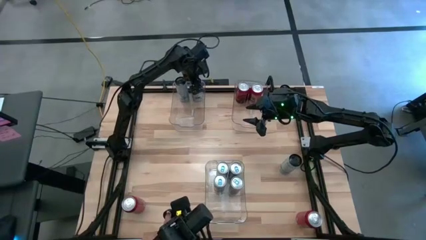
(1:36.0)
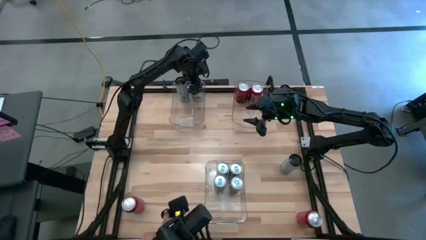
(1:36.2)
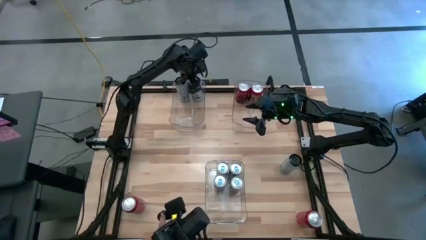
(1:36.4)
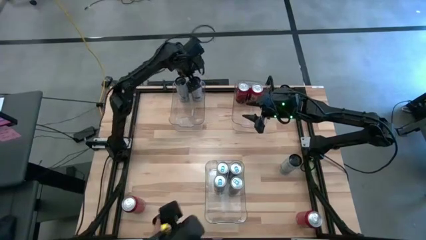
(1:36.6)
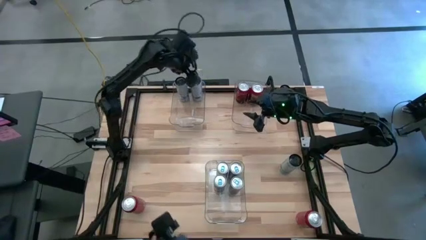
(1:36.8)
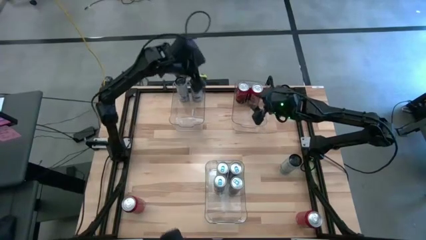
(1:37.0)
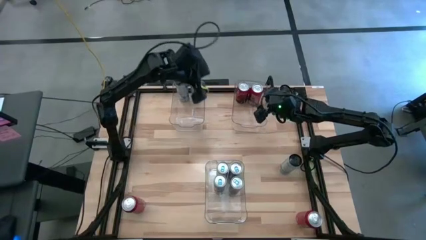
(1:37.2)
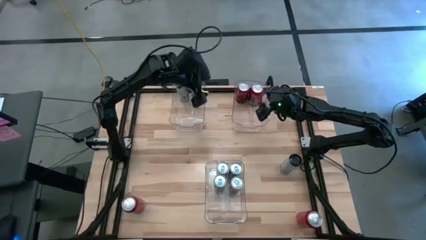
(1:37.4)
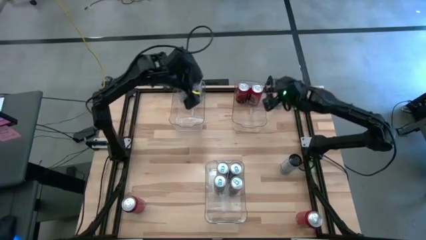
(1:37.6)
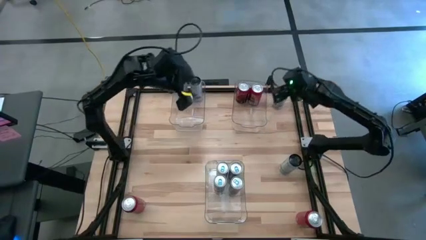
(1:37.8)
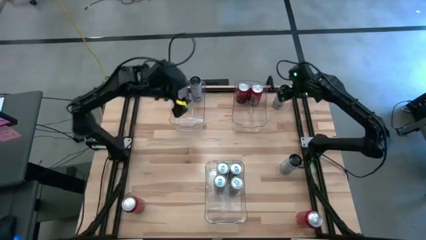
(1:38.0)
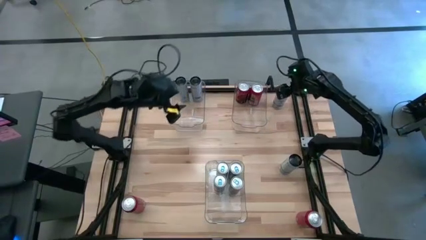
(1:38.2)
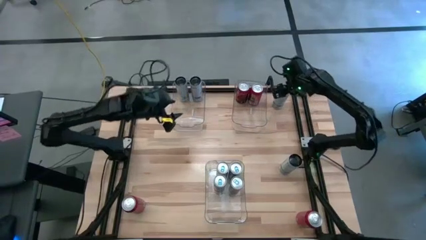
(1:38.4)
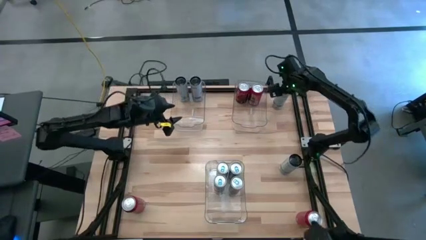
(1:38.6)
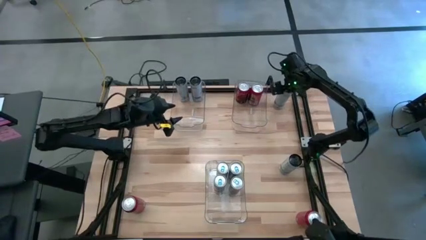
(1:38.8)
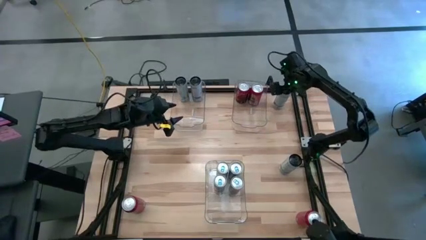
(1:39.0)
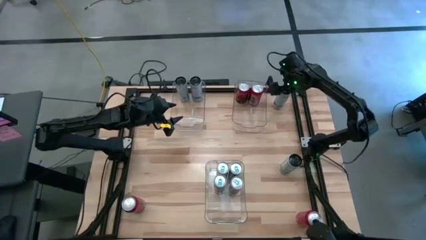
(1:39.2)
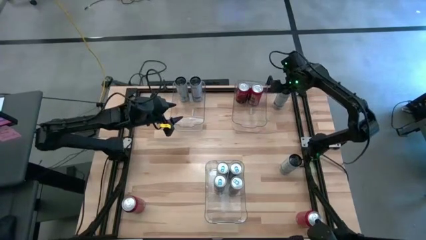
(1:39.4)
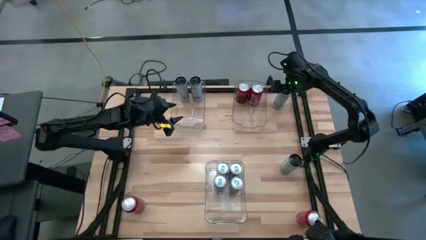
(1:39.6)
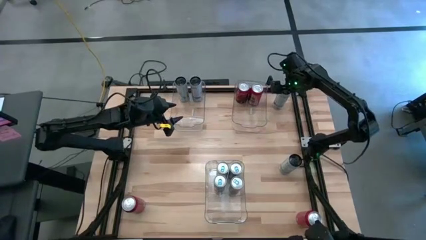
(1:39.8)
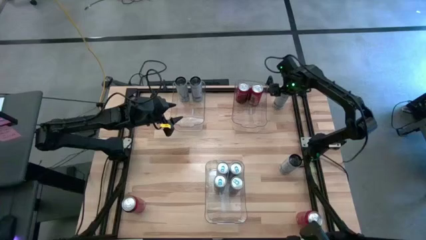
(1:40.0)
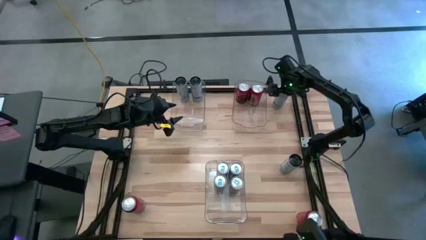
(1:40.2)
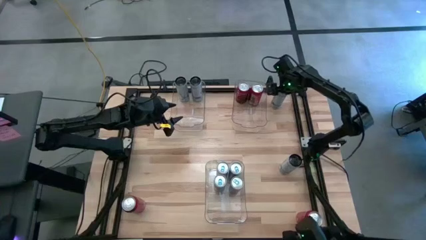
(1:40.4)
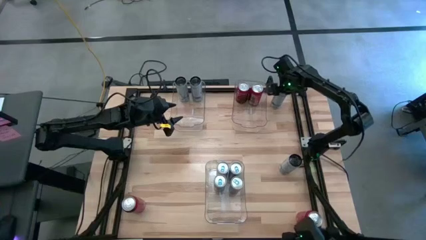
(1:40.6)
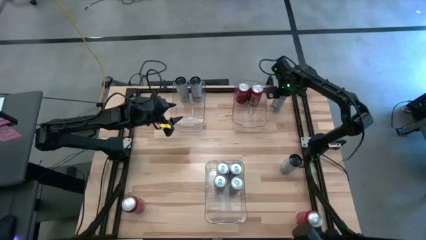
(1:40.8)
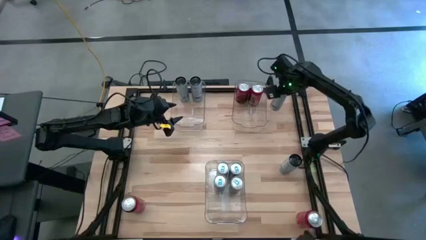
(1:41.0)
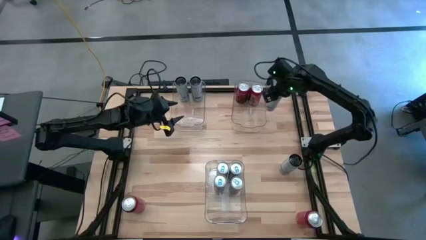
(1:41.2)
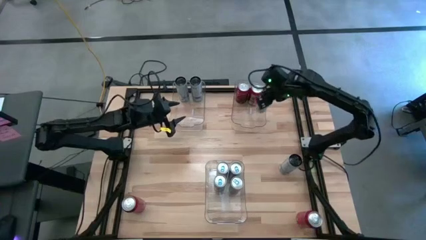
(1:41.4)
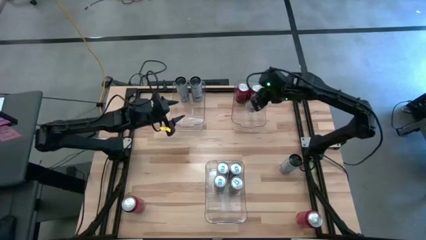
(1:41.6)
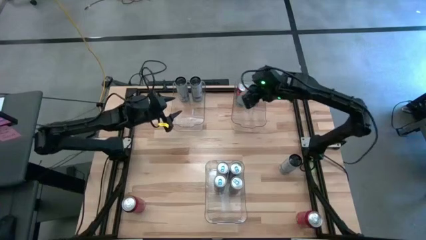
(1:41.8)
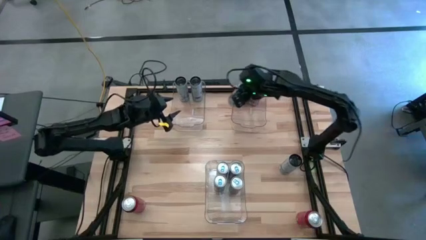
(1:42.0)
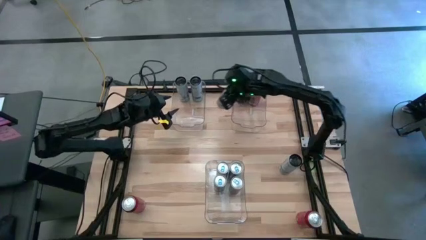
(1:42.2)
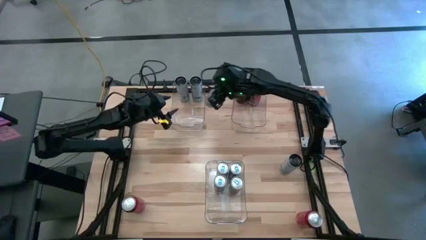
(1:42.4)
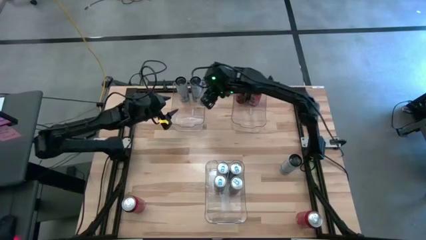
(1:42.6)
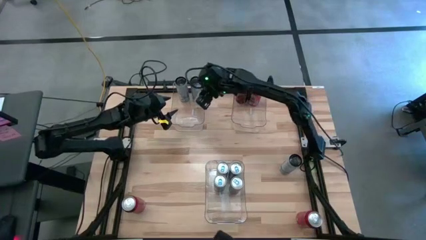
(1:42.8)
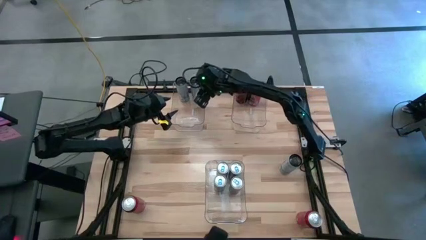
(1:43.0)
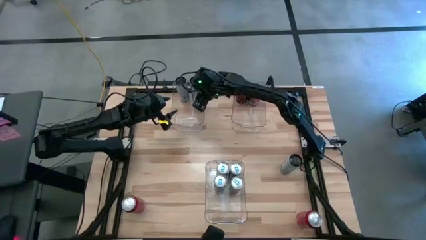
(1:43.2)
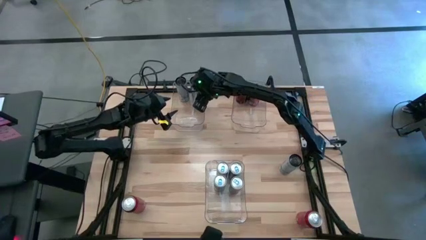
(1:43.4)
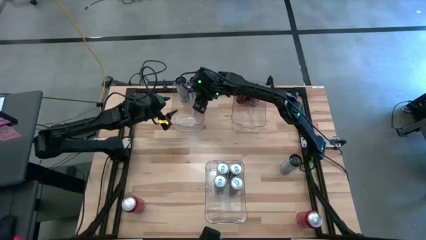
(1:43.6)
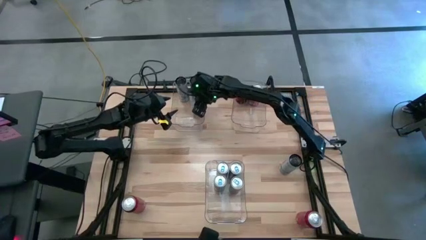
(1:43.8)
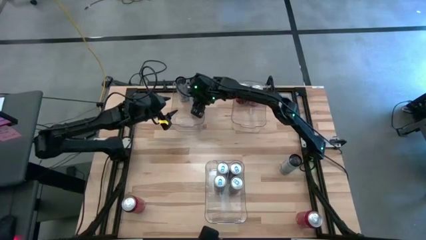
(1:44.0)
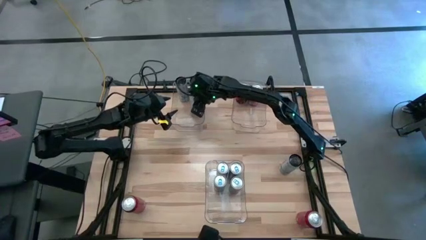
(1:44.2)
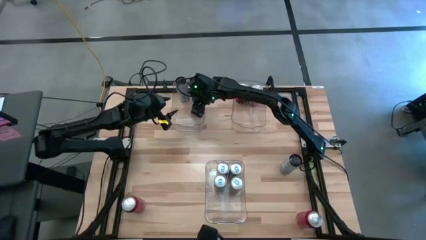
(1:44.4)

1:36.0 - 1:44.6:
Task: Sort soda cans
Put the top white soda can into the top left transparent bin

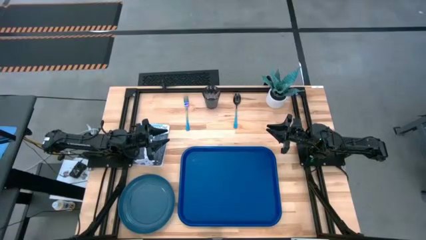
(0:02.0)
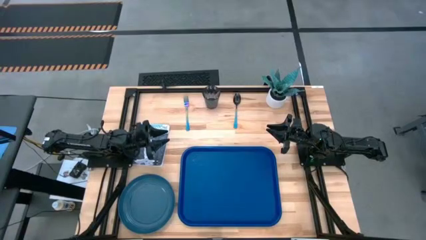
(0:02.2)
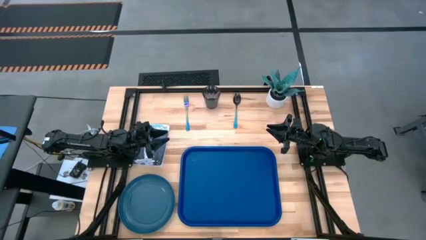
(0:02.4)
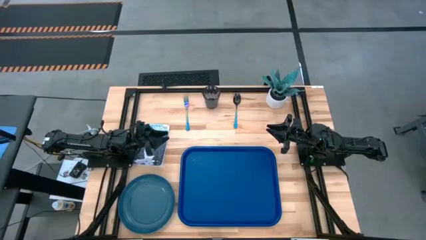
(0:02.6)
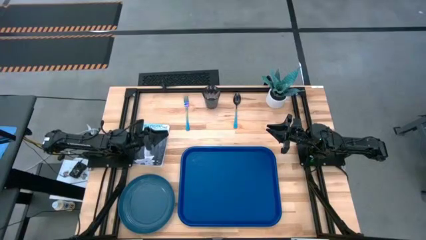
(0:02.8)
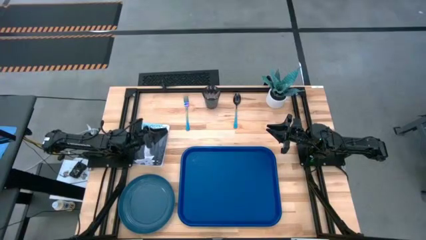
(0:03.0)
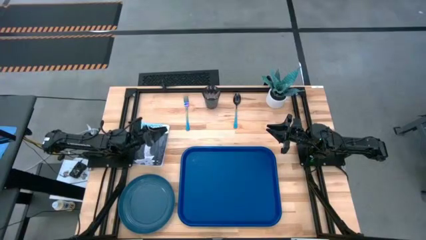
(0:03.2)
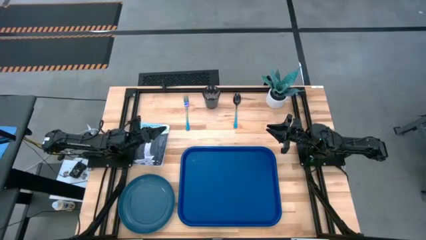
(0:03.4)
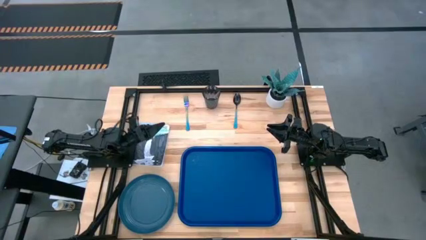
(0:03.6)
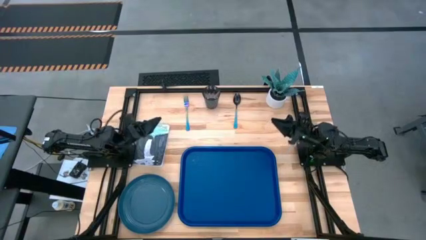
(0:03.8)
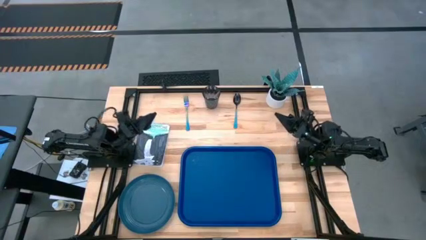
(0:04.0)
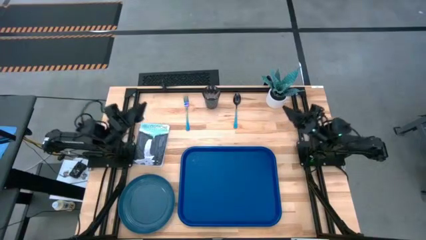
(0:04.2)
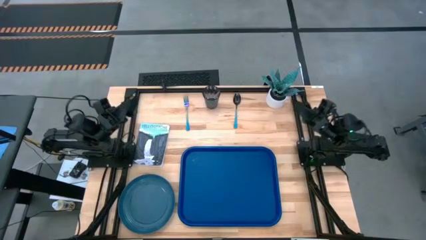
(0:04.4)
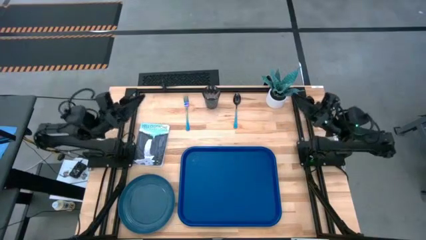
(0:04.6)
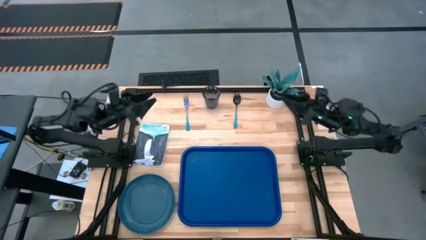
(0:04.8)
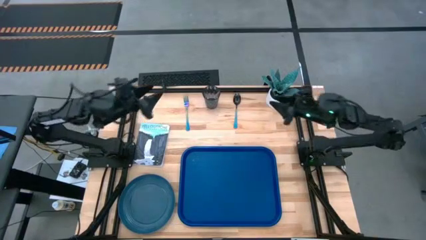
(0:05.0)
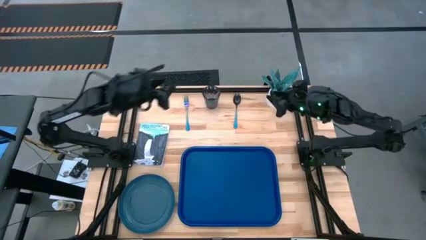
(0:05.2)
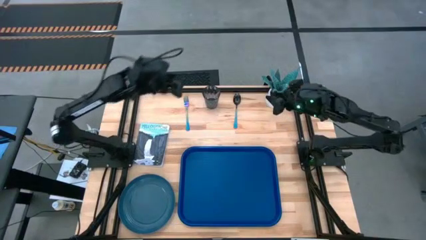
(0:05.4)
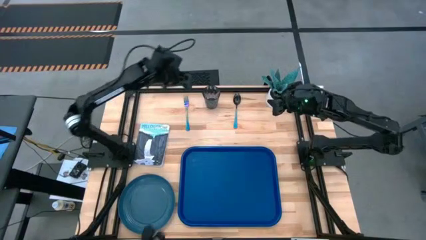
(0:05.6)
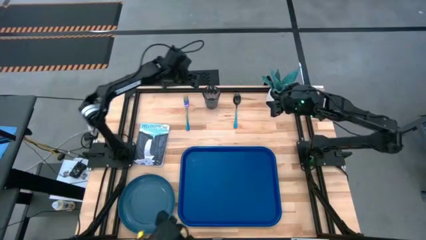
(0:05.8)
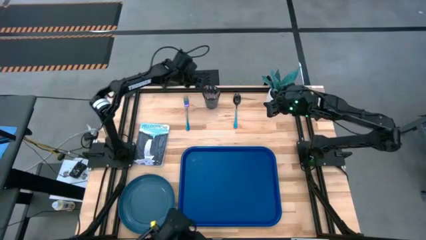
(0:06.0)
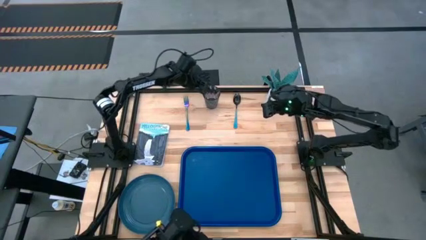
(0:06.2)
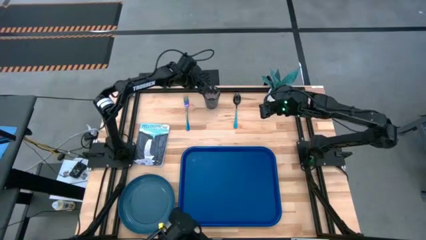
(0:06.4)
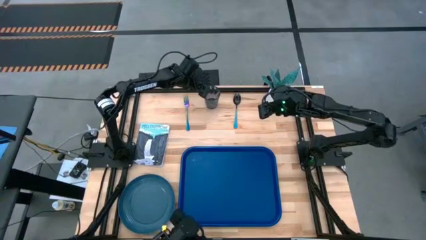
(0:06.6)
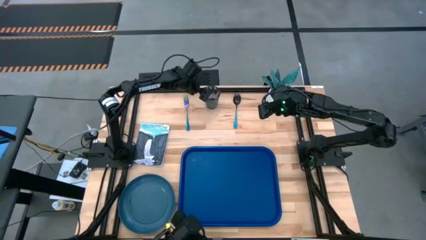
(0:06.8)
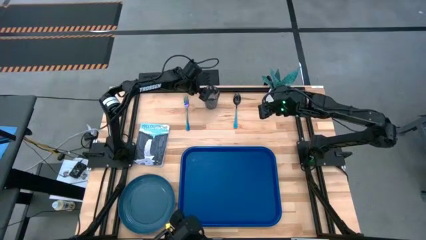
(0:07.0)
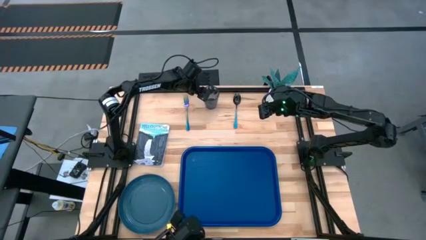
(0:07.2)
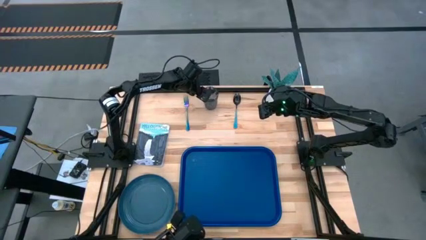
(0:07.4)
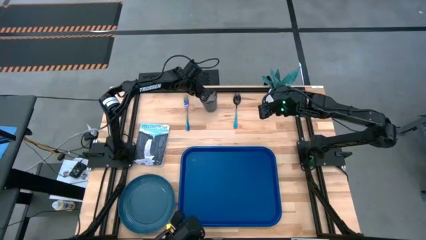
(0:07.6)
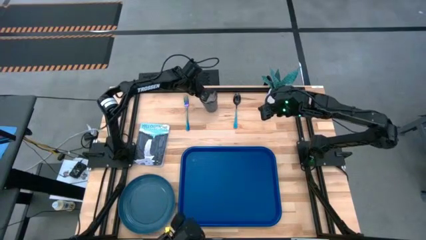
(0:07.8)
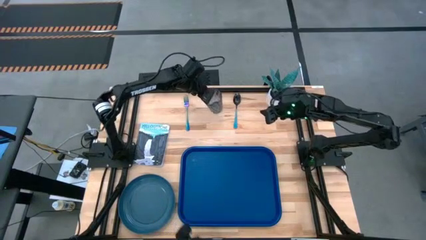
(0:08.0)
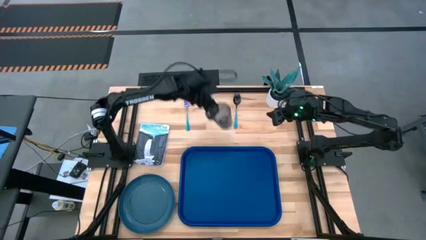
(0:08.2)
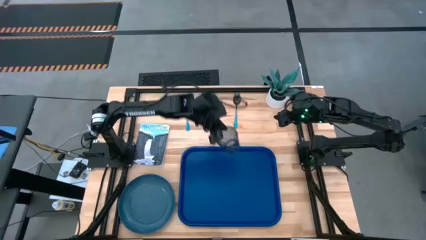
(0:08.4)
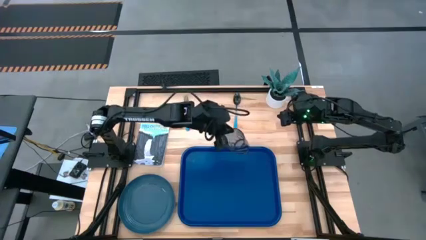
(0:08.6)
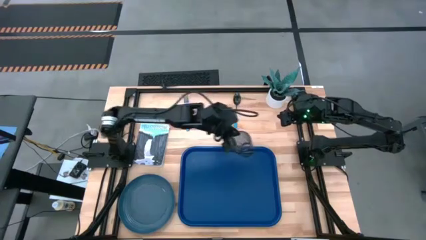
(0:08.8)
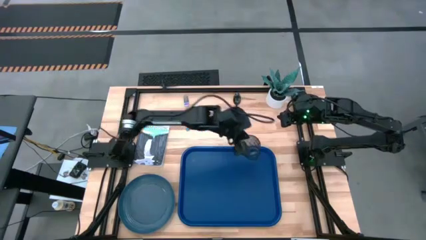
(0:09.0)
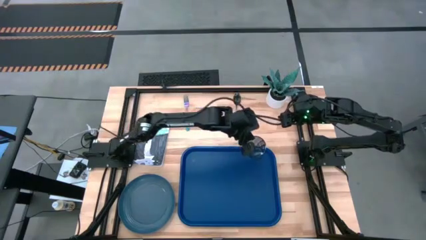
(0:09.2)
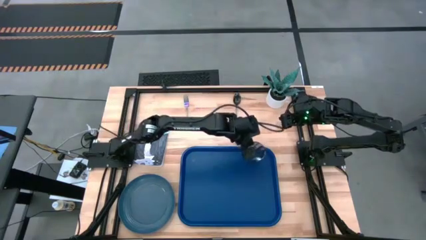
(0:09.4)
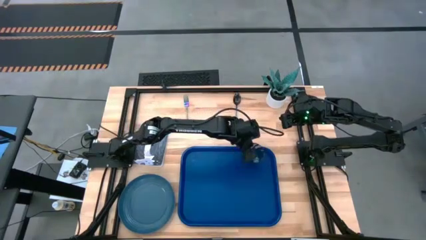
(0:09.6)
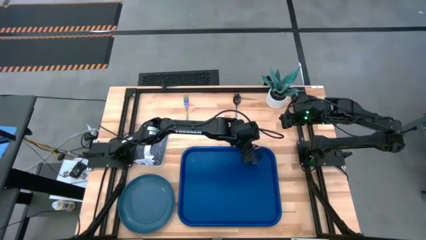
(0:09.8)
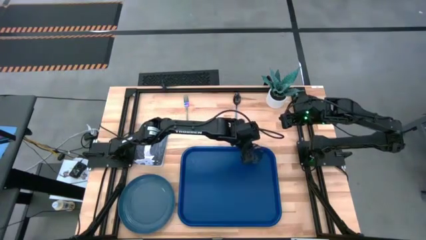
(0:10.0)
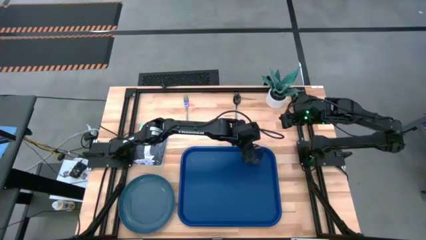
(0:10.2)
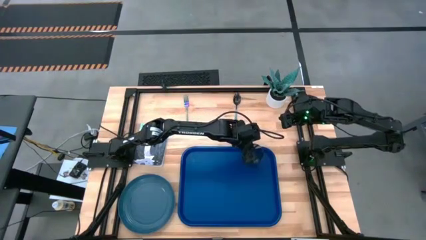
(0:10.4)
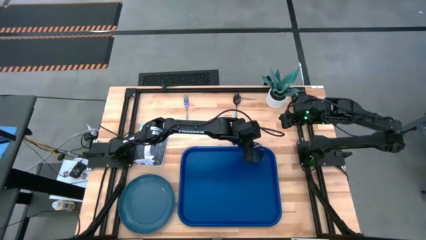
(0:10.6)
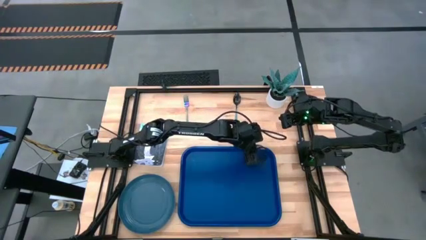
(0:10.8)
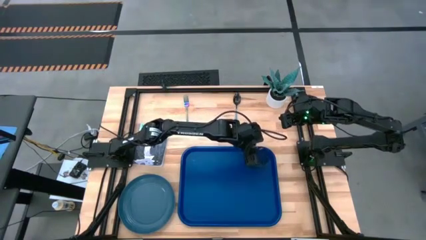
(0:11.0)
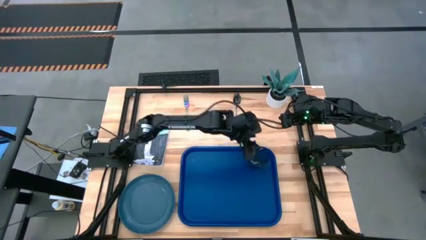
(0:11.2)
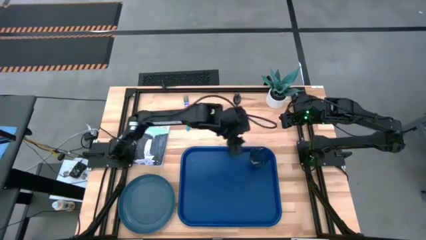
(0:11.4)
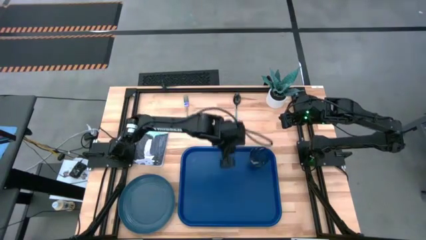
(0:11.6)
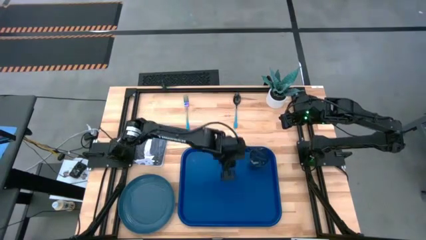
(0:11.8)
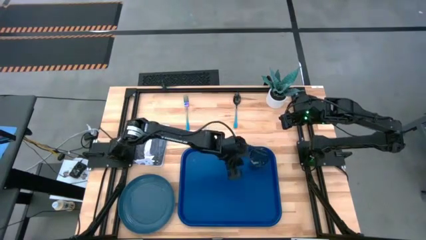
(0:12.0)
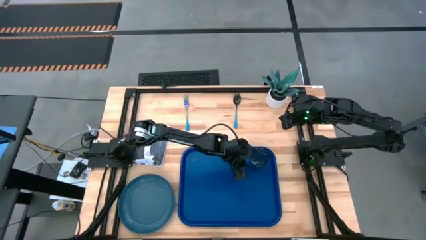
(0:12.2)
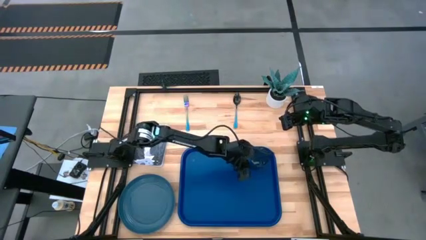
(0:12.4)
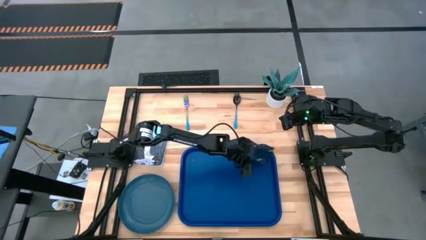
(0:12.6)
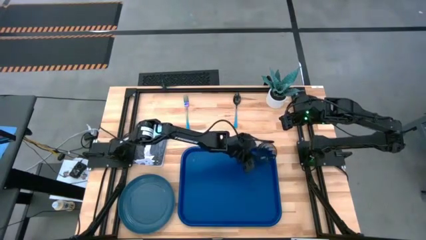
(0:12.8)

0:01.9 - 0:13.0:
Task: Pick and place plate/cup/fork/spoon on tray
Put the glass on the top right of the blue tray
